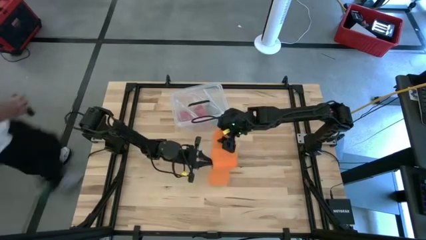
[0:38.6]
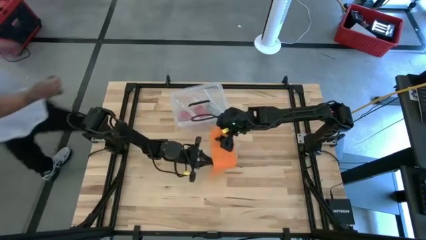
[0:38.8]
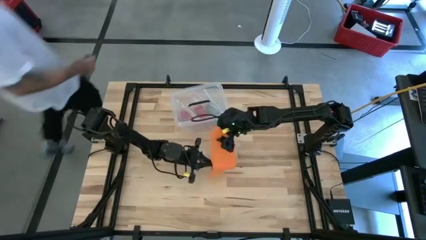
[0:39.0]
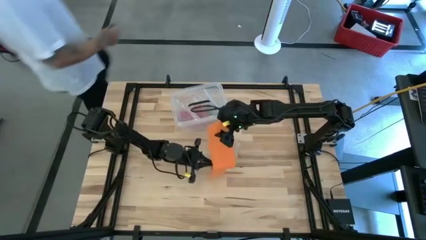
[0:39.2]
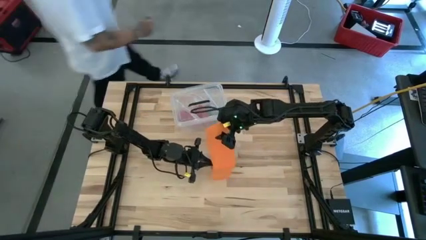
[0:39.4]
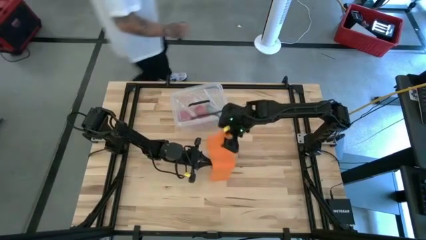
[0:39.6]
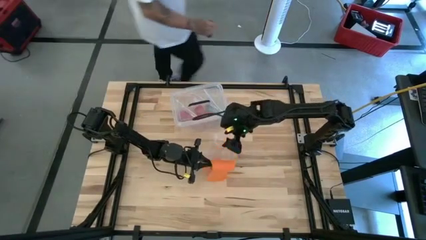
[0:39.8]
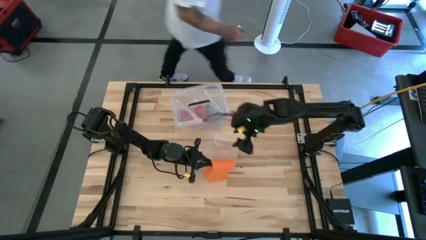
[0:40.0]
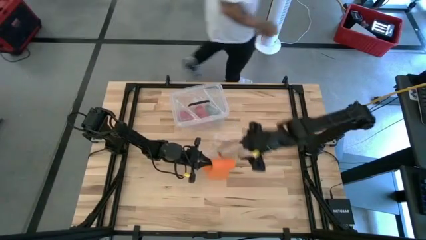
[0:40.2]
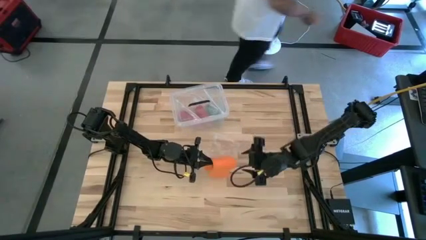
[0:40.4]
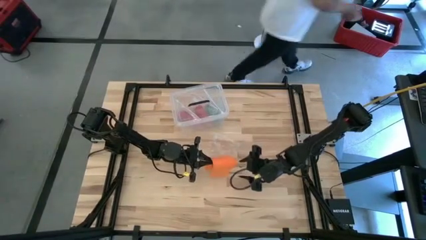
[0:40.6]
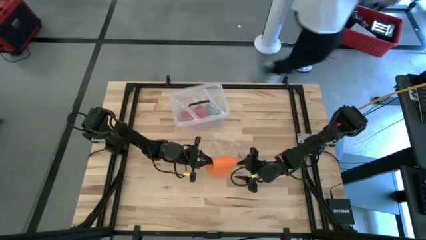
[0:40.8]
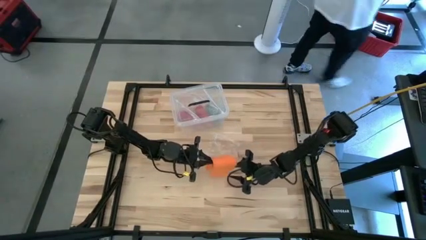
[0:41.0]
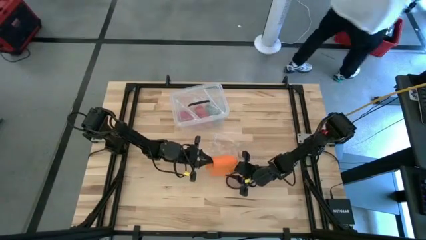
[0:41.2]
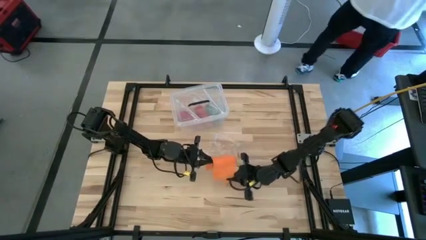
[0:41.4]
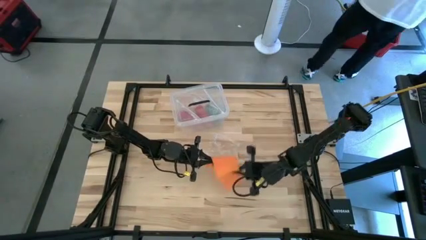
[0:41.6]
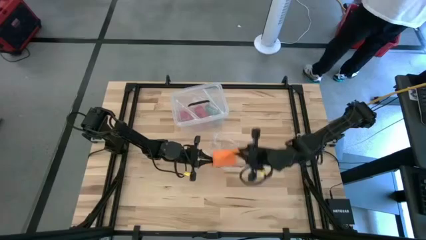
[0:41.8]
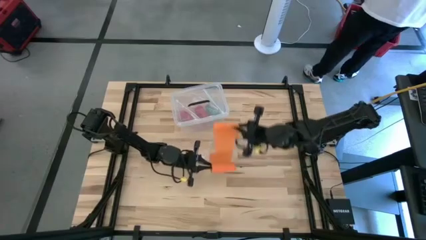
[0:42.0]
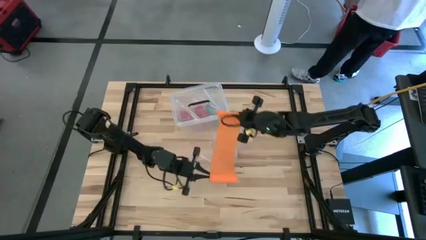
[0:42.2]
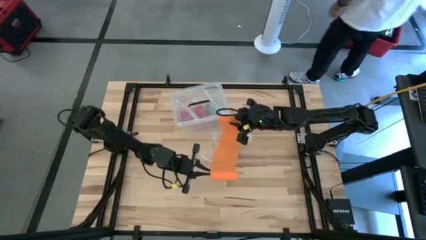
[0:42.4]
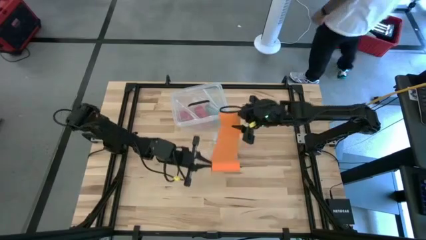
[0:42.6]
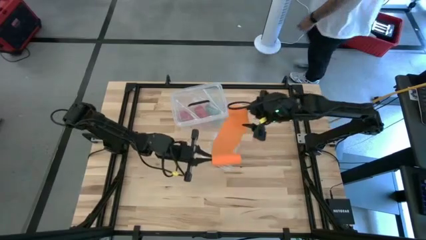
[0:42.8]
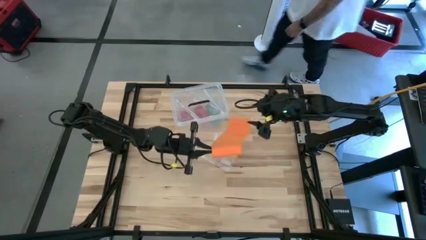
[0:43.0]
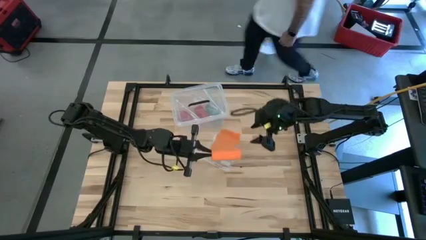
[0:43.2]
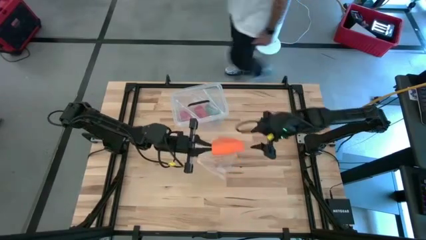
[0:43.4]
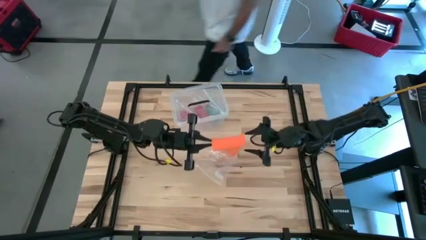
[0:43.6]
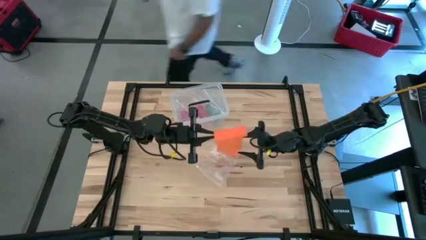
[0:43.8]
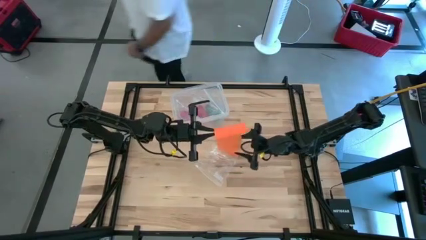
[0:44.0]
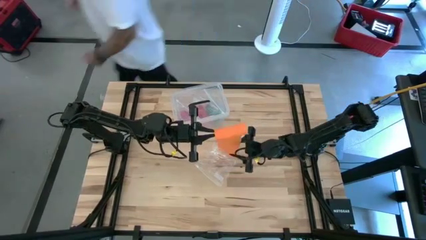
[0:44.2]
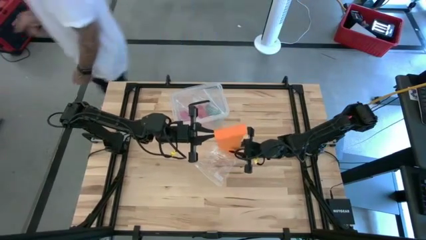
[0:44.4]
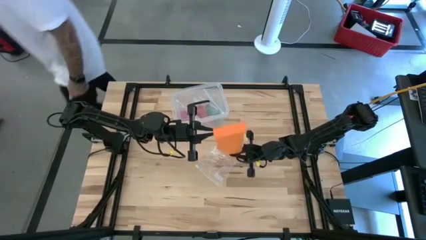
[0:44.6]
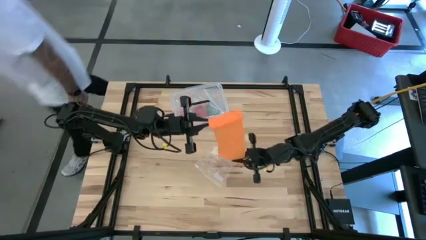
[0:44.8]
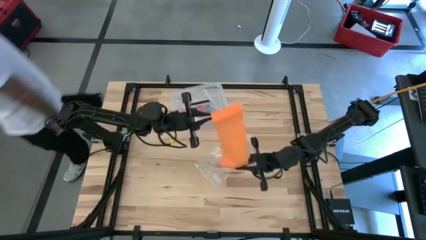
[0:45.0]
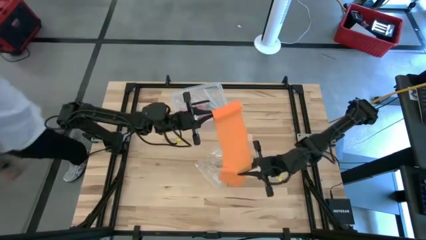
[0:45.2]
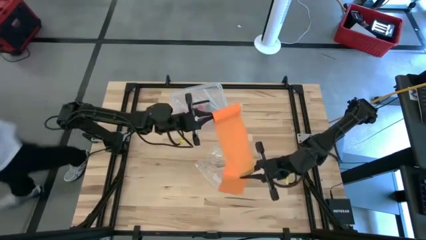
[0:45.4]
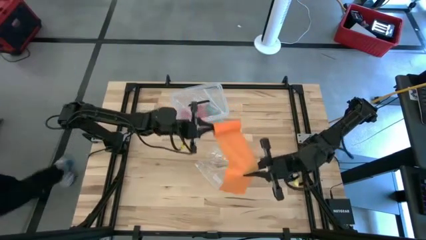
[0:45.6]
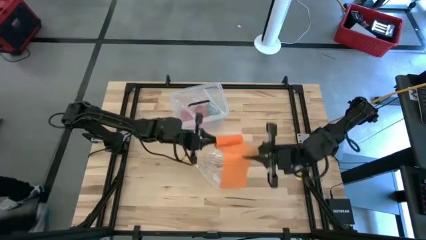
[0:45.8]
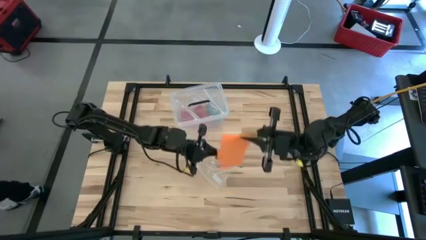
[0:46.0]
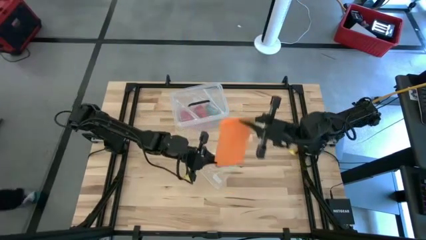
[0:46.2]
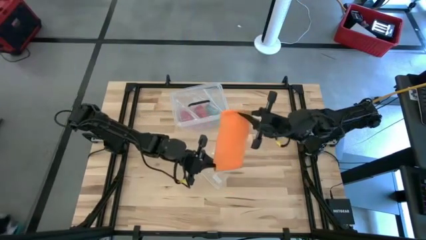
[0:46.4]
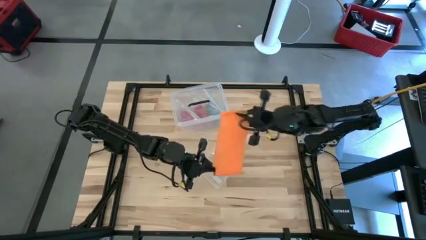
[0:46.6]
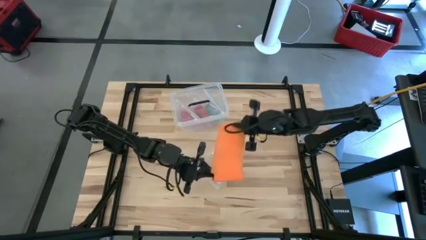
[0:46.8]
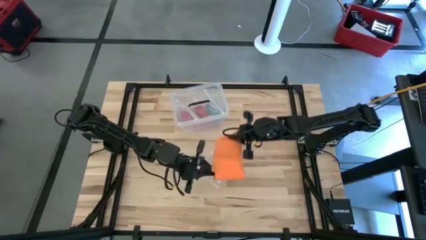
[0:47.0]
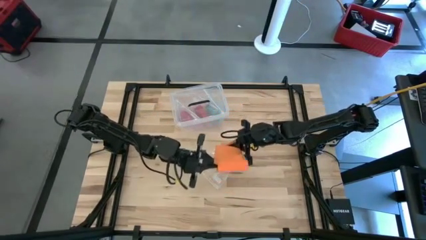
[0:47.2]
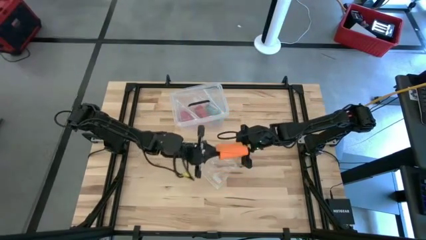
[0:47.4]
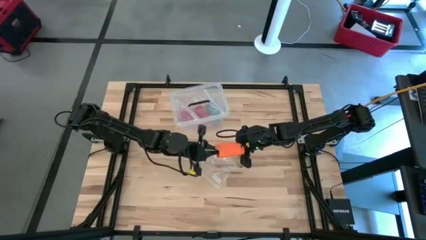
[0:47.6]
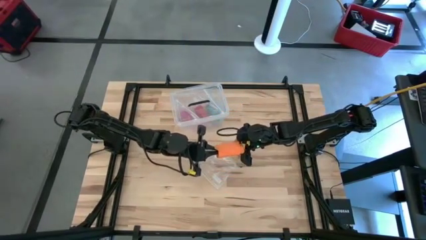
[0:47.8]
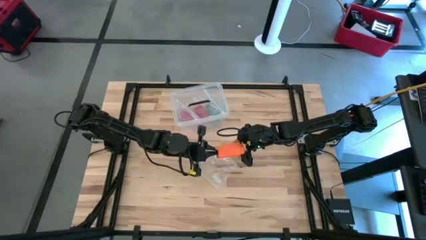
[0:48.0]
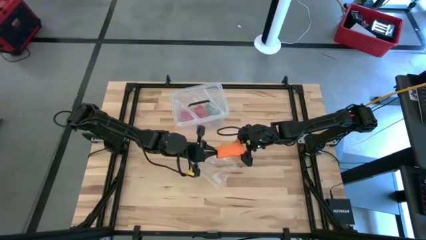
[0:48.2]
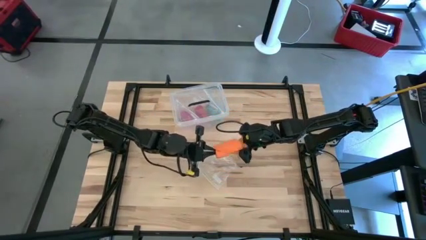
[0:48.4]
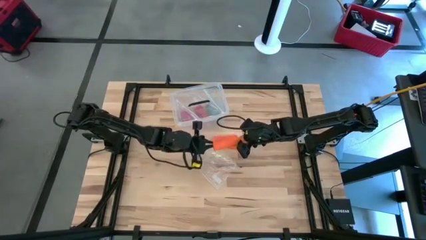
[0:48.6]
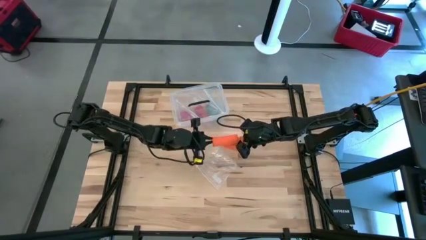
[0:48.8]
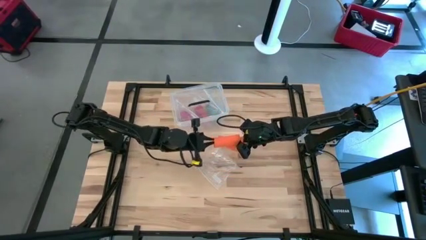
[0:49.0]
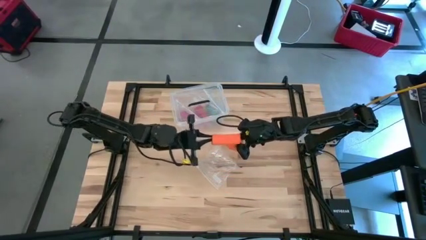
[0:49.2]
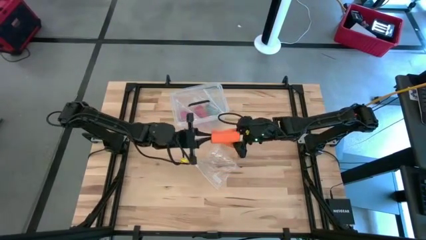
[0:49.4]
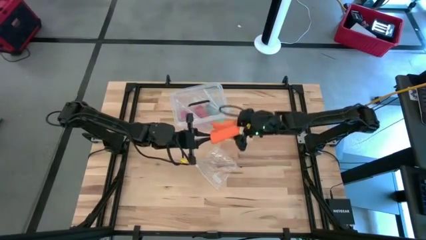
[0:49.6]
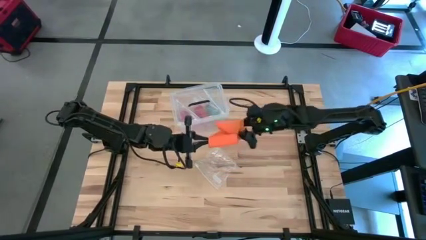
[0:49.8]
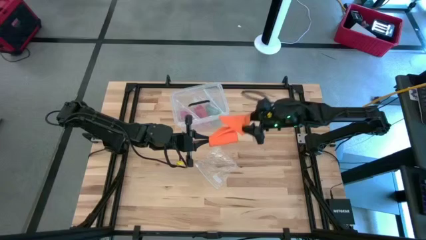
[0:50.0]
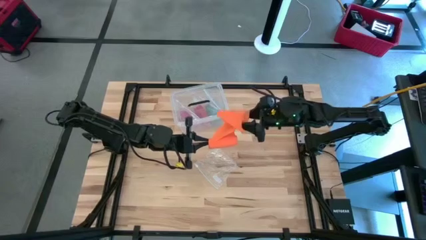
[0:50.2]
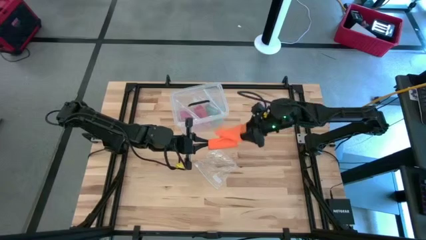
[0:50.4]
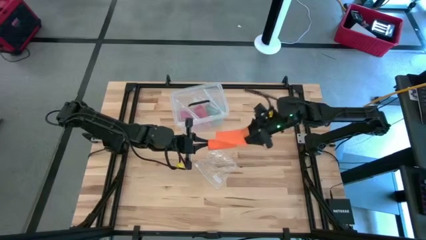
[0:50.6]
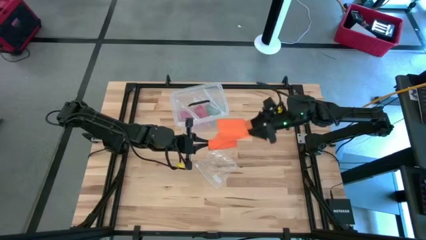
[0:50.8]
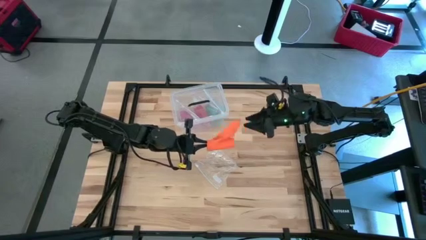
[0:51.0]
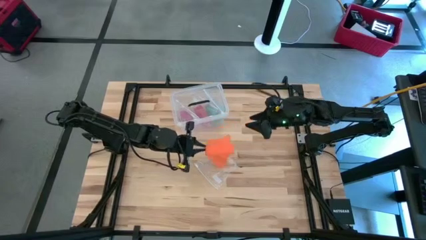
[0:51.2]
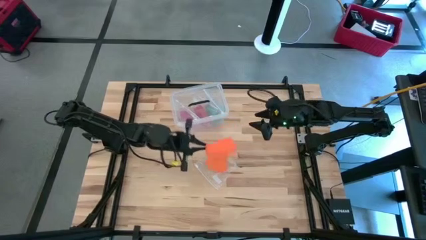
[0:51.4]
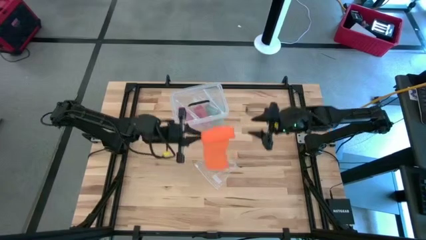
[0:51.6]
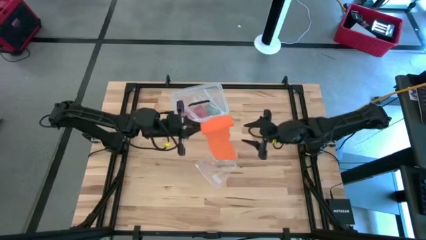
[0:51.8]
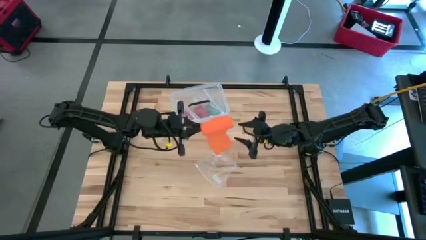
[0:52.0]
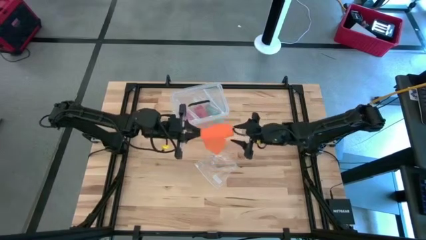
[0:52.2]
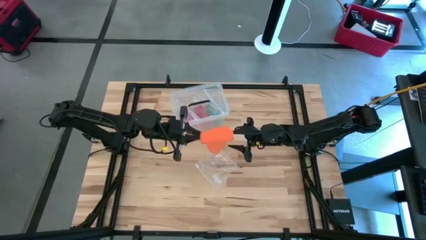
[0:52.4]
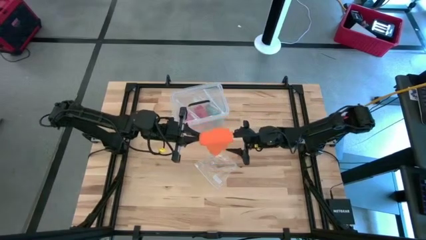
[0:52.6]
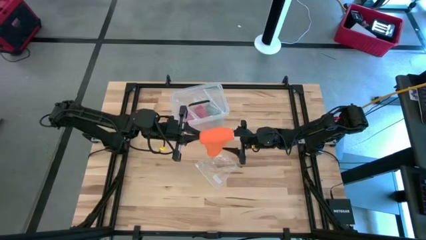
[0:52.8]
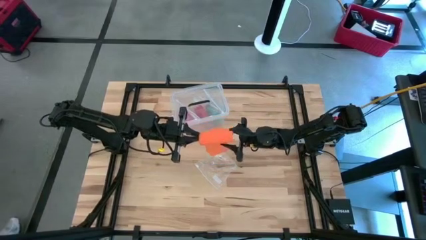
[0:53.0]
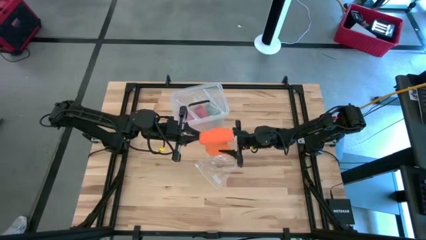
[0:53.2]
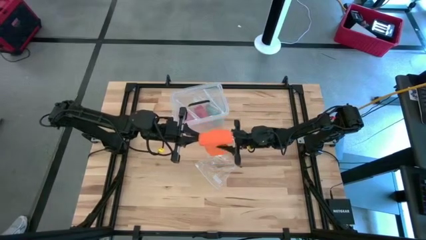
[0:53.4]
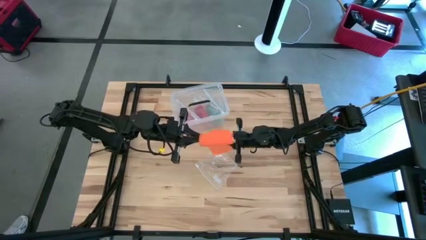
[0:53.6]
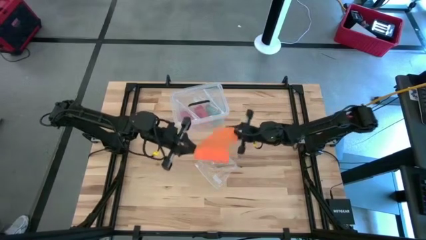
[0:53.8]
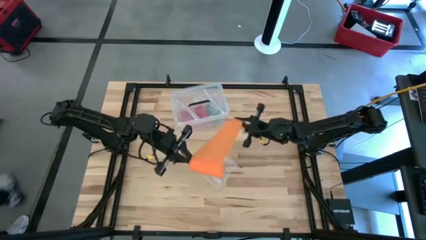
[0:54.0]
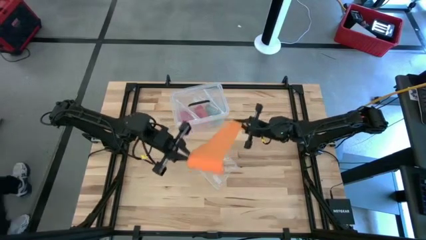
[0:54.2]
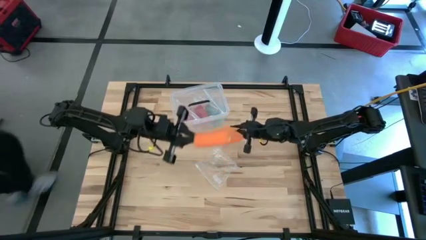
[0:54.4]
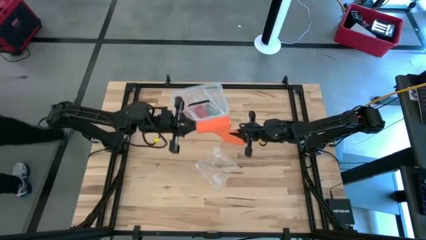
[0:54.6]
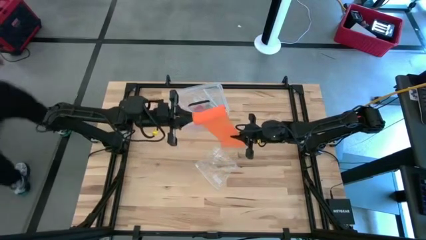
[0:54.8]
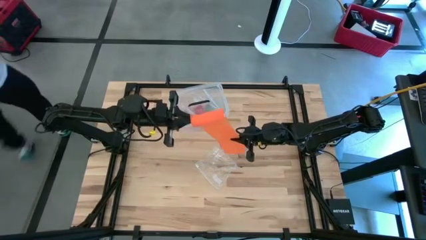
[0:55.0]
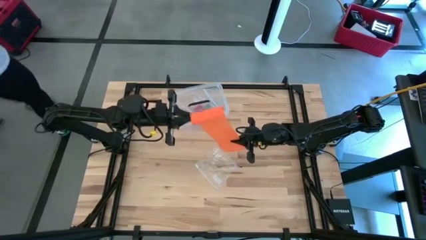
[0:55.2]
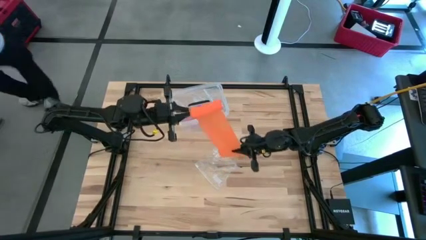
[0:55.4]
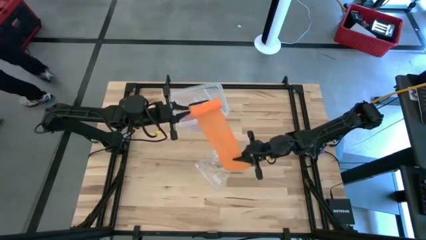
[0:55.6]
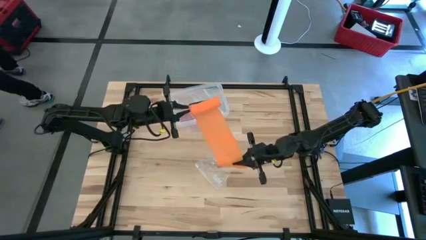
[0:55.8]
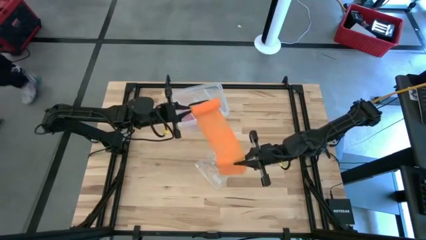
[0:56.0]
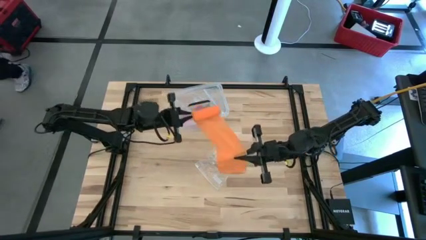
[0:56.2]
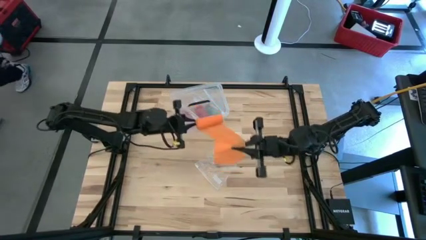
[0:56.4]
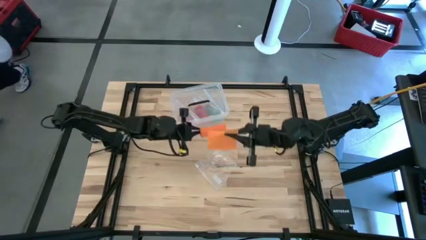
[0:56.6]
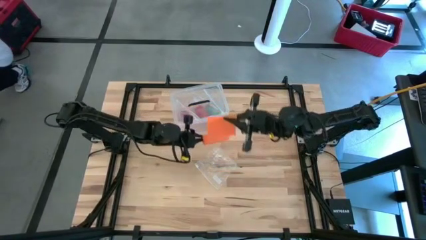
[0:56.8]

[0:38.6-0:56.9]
Task: Roll bandage
Roll the orange bandage
